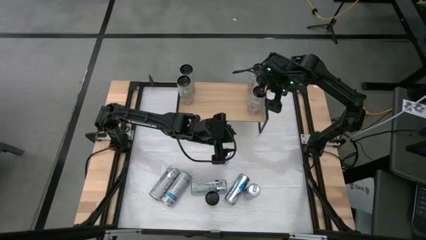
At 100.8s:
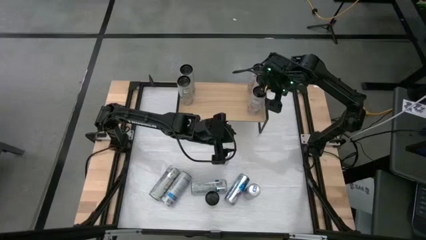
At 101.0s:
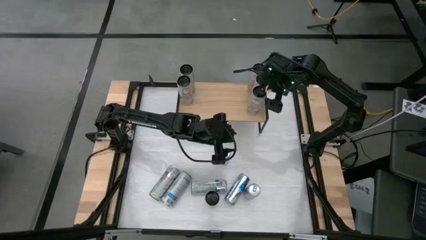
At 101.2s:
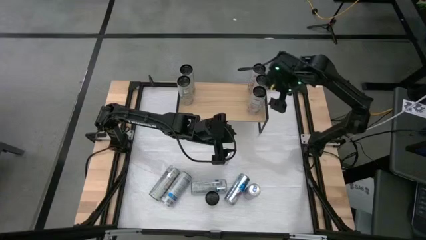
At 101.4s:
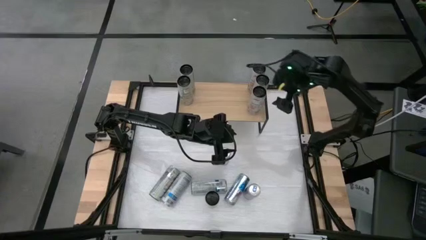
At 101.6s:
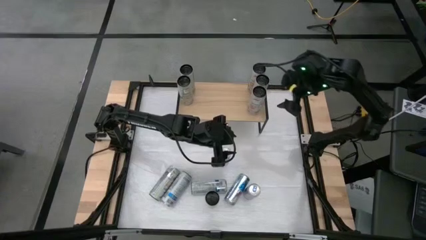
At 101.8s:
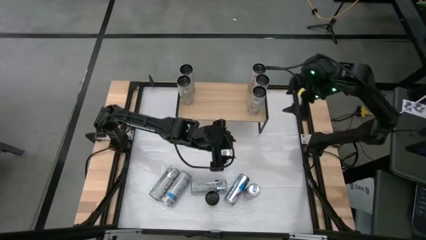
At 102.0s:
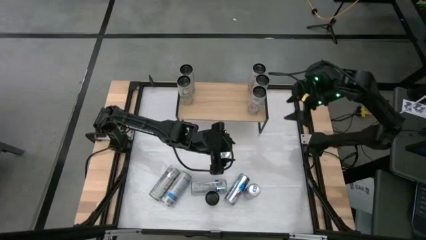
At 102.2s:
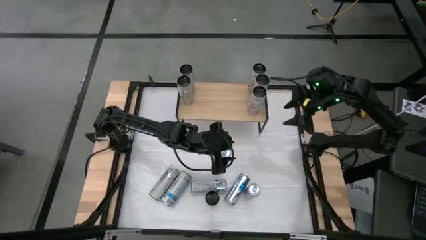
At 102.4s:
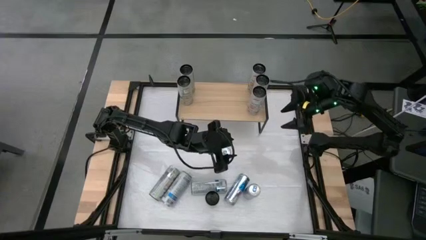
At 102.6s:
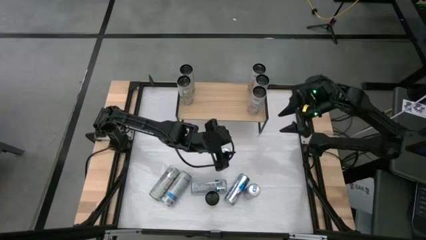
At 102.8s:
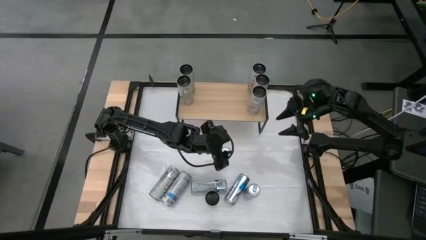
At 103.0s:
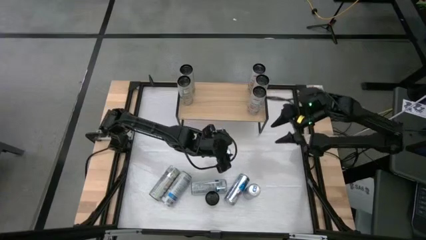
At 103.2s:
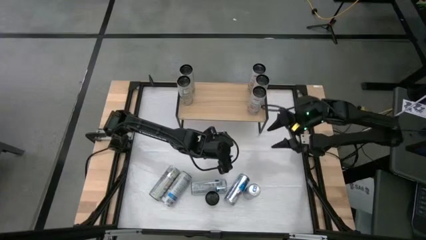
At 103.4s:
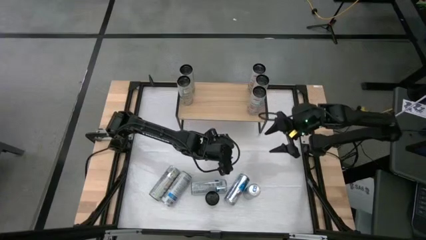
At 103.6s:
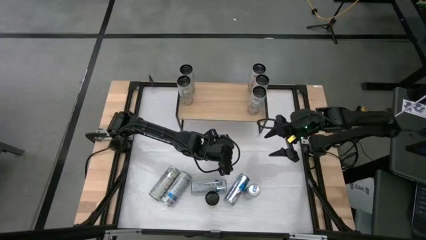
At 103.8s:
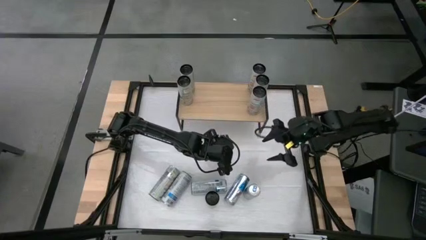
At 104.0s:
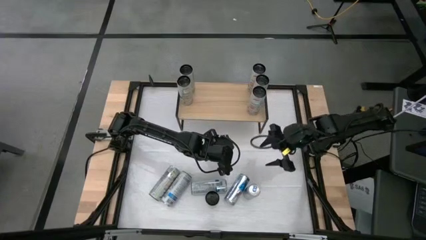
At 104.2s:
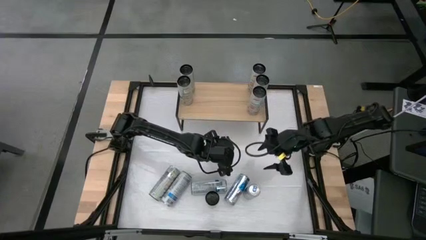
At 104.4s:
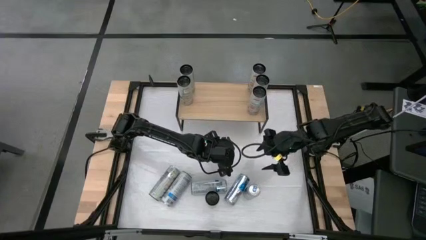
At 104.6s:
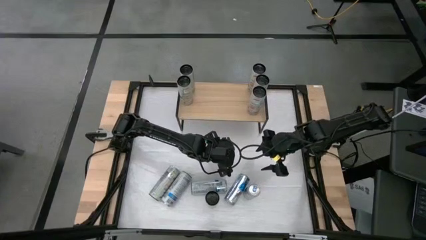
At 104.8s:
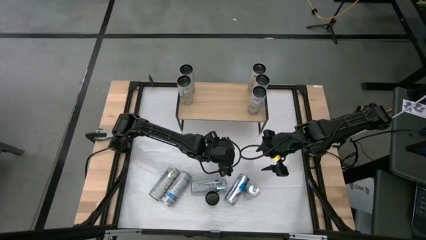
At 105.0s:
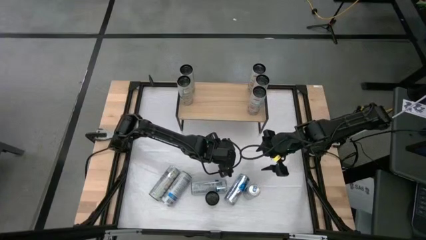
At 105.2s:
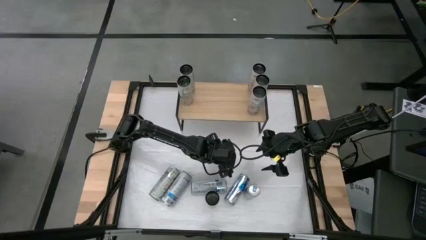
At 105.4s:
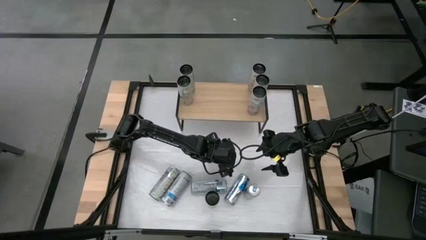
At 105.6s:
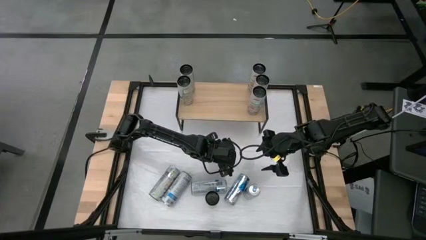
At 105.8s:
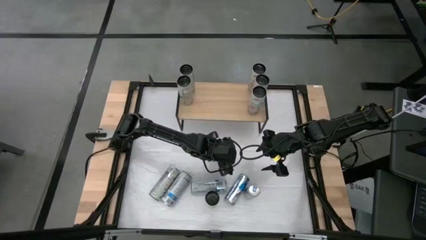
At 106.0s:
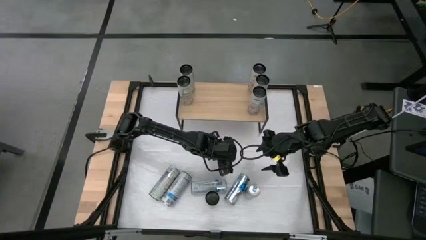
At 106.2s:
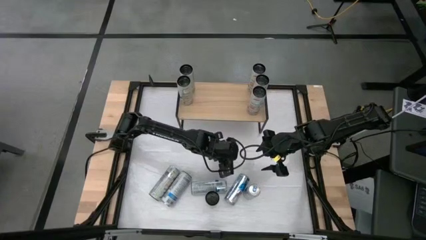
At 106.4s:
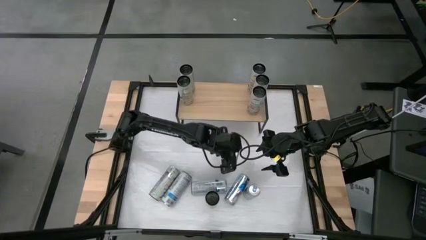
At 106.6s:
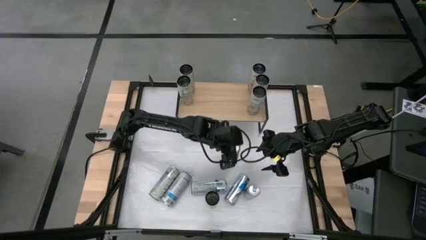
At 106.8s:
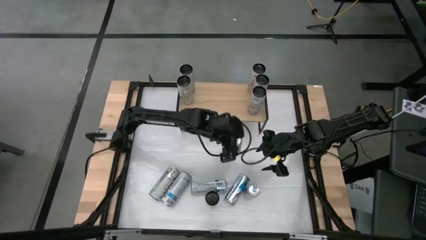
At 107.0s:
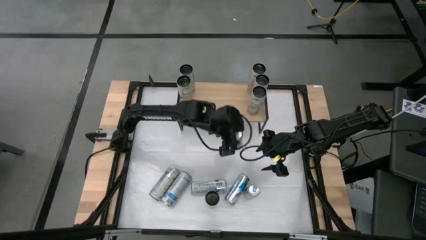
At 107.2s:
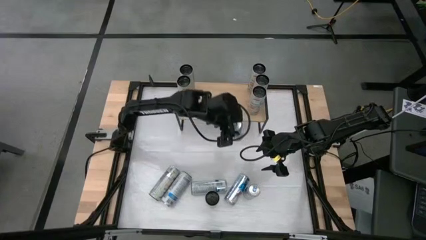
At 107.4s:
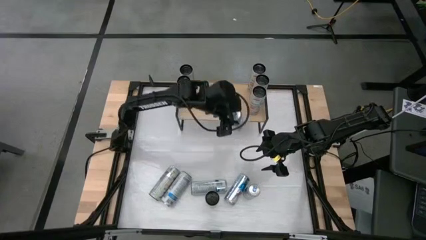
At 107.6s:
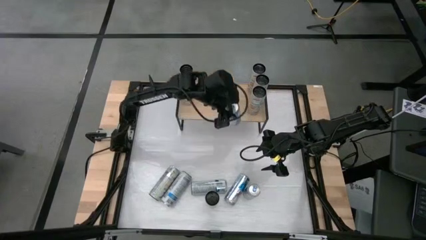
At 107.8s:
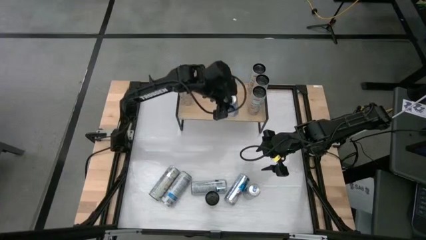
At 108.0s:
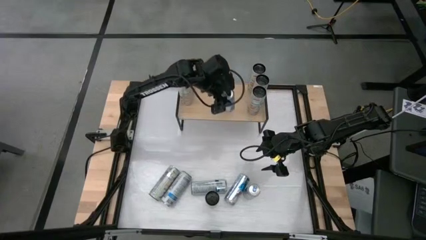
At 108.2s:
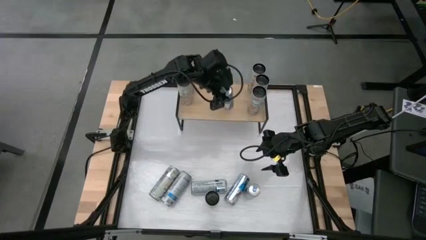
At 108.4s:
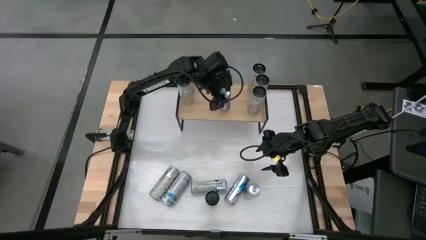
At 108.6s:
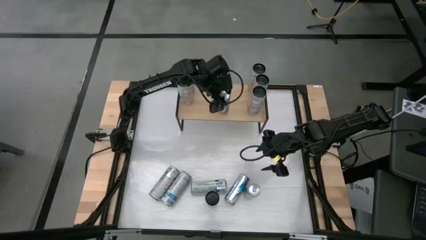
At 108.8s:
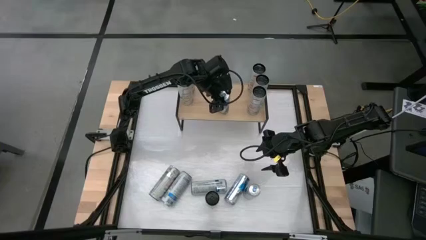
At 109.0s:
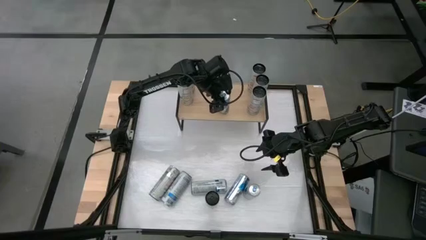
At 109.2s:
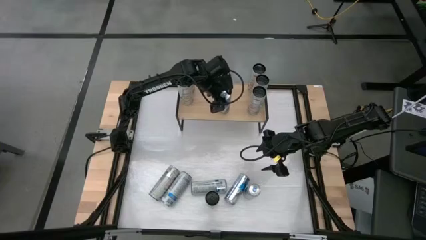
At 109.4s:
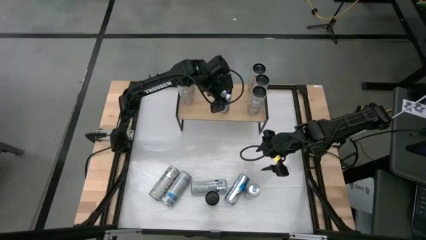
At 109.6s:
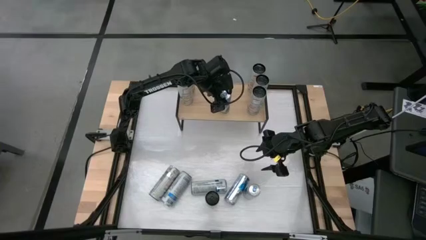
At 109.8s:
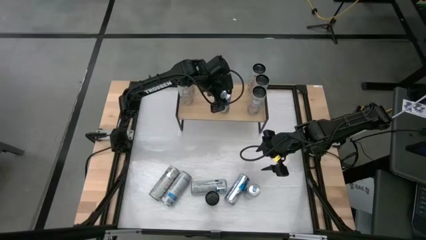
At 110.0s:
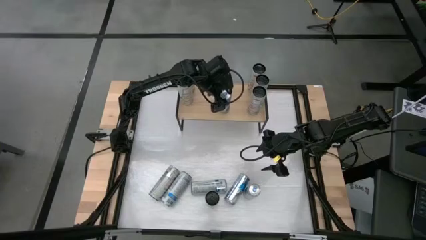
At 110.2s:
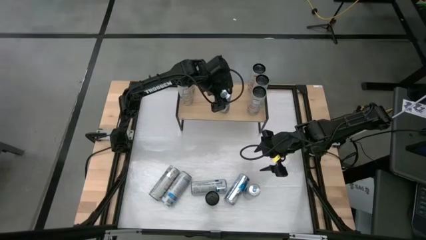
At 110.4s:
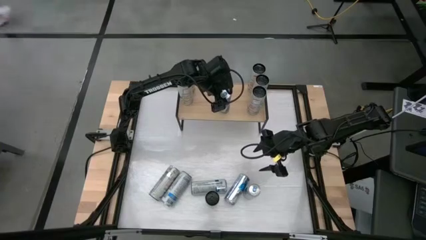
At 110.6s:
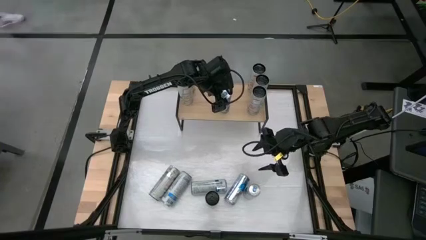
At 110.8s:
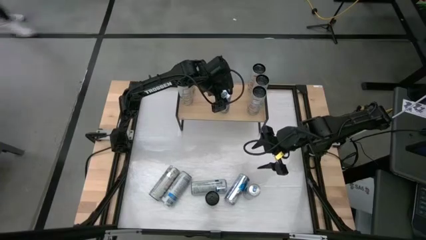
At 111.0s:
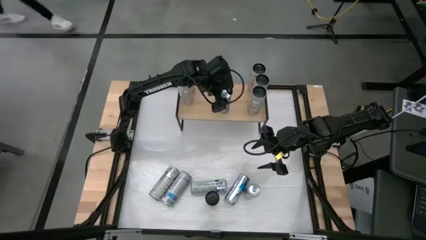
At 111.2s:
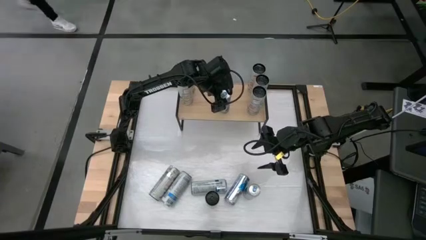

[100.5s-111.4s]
Task: Sort soda cans
Put the top blue soda can on the shelf

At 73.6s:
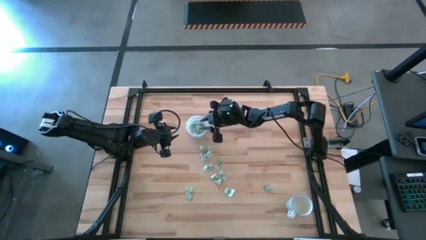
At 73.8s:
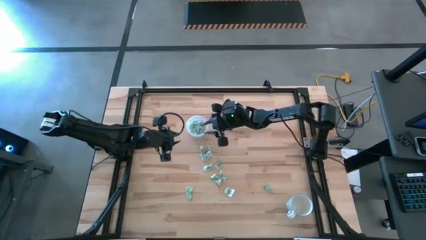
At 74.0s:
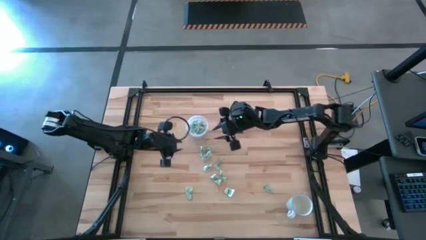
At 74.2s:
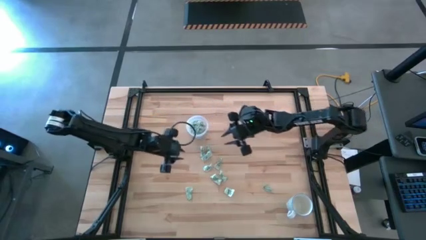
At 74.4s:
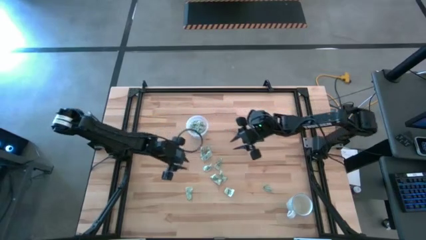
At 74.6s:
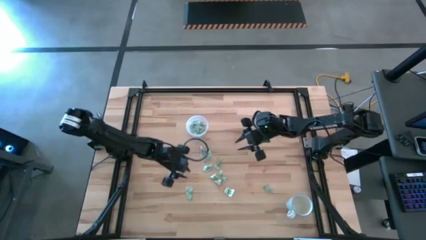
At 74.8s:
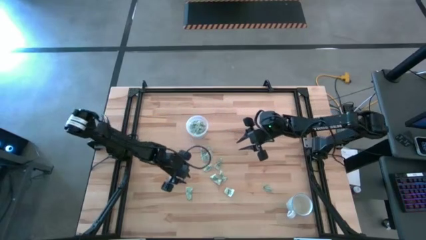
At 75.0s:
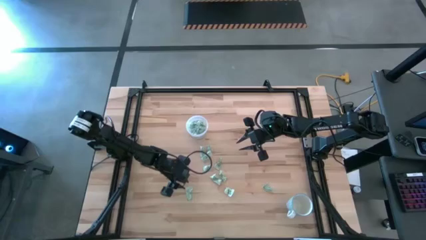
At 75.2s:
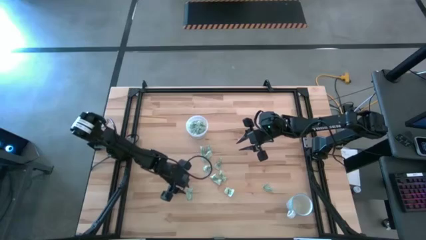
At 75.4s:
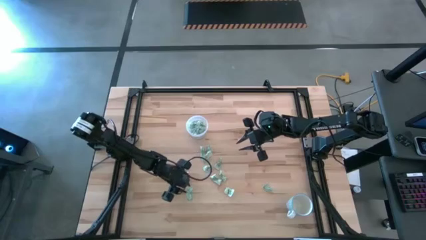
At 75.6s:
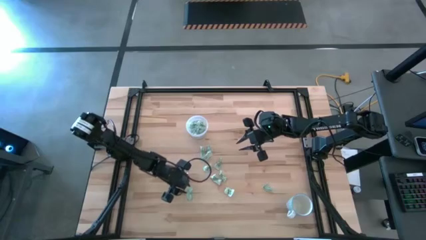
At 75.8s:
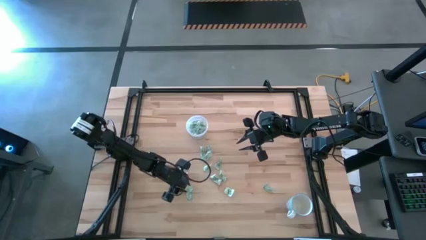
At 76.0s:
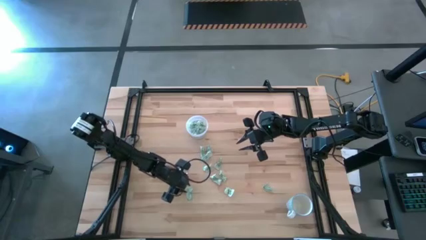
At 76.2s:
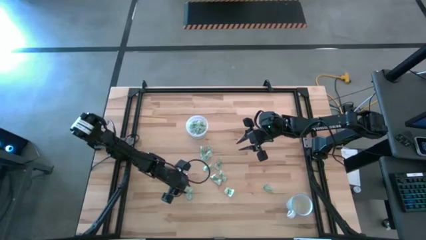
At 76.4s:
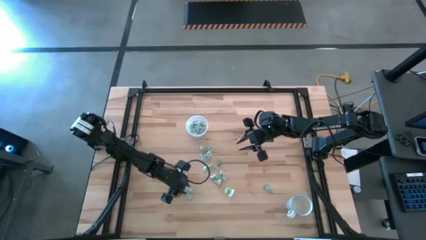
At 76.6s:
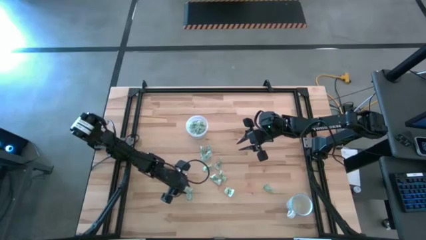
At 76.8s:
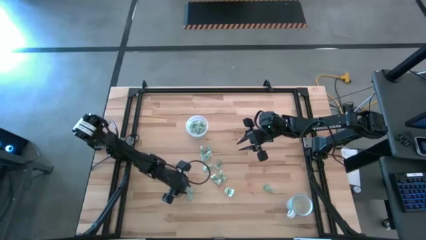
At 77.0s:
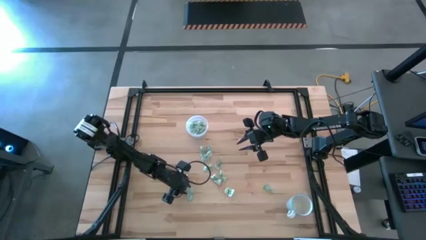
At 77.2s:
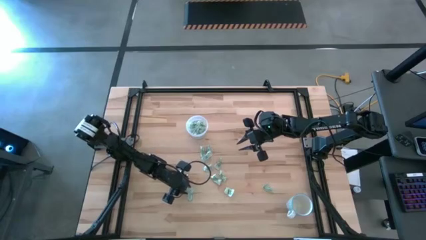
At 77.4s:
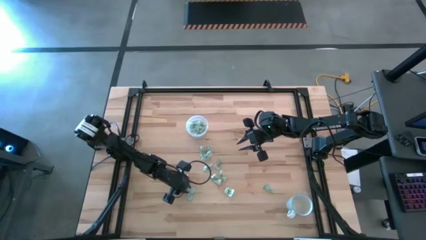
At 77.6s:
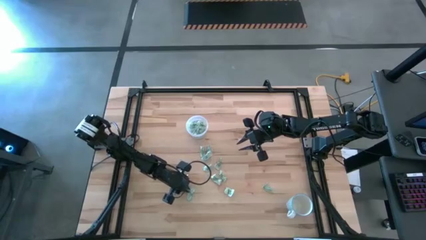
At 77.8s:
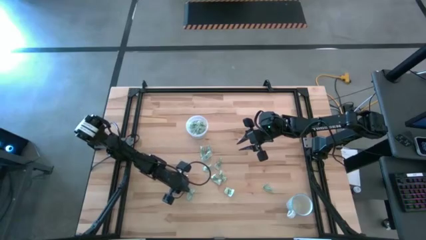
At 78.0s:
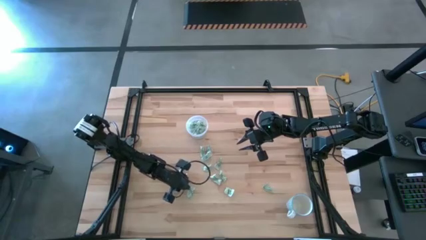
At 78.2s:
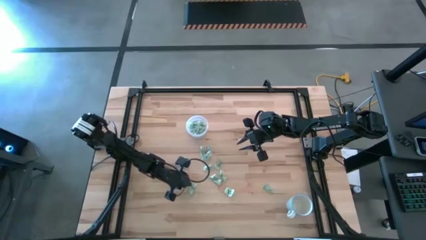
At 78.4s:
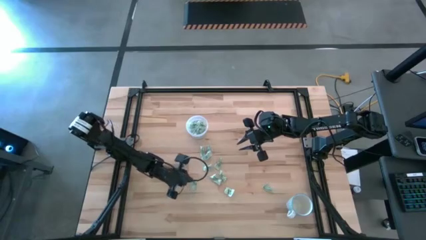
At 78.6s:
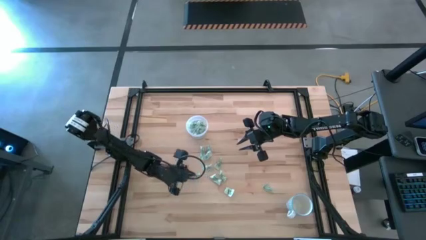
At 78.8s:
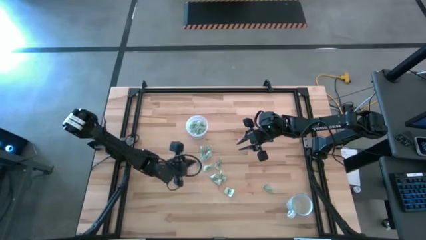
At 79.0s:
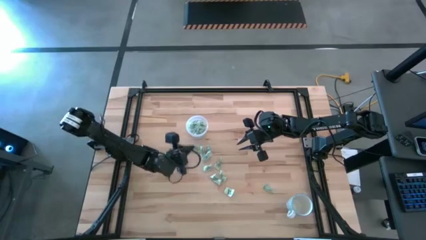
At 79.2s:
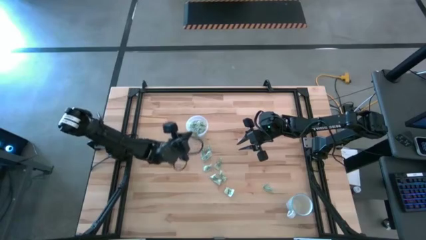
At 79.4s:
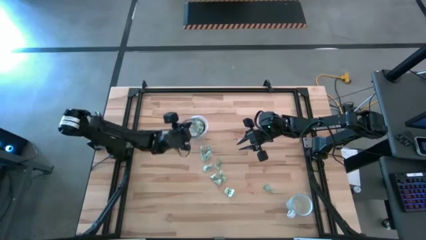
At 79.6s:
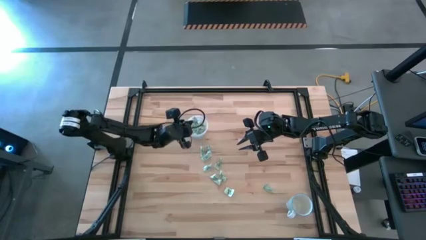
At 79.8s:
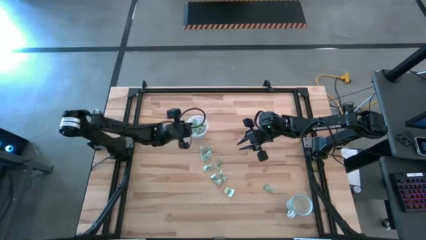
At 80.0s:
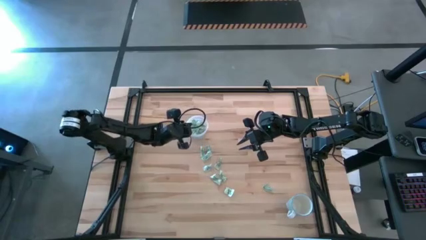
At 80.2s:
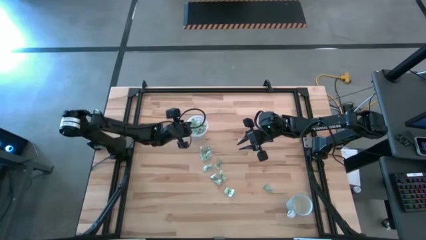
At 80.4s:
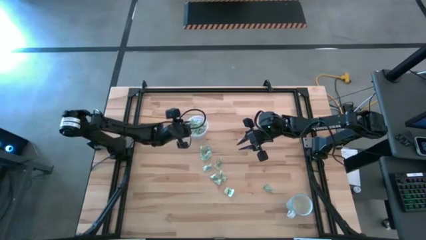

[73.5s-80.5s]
Task: Pick and place Stevia / Truvia into bins
Put the stevia packet into the transparent container
